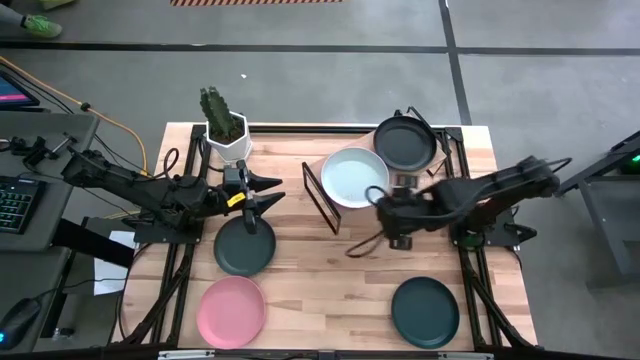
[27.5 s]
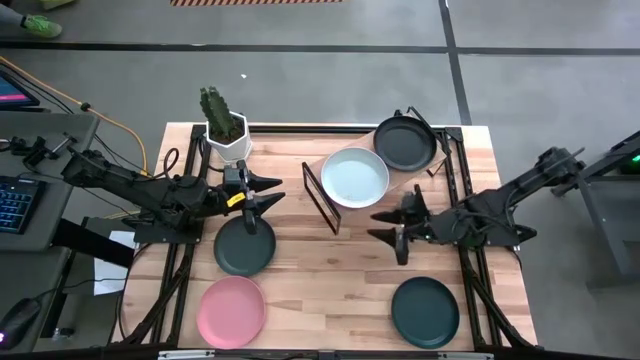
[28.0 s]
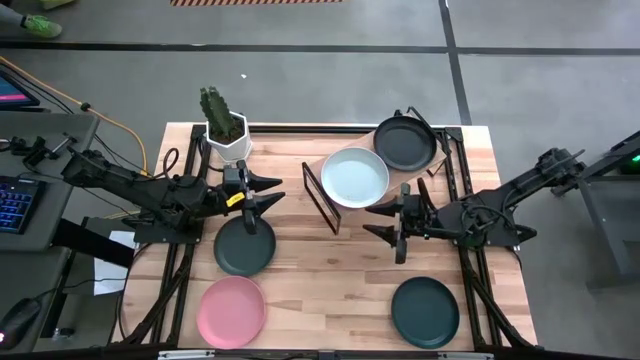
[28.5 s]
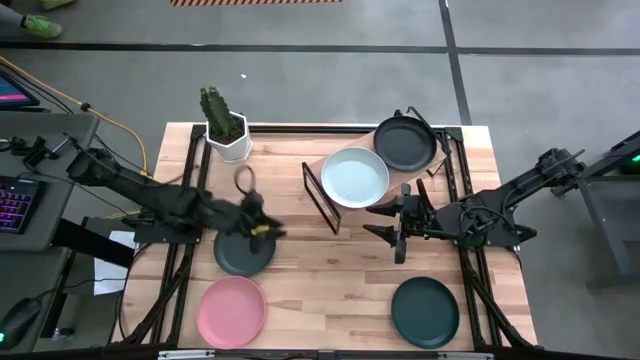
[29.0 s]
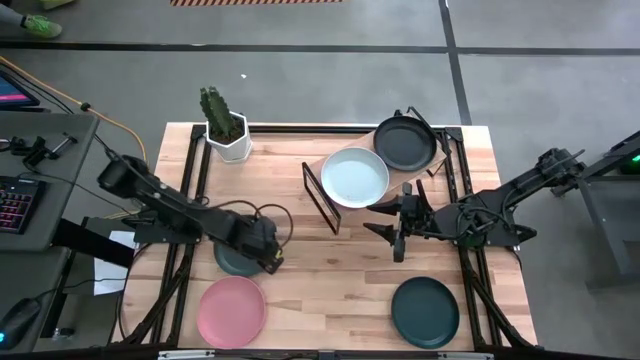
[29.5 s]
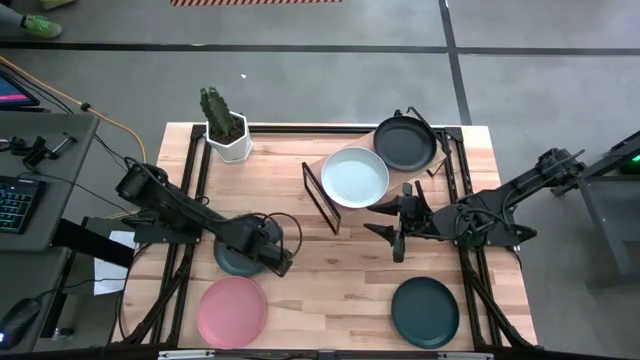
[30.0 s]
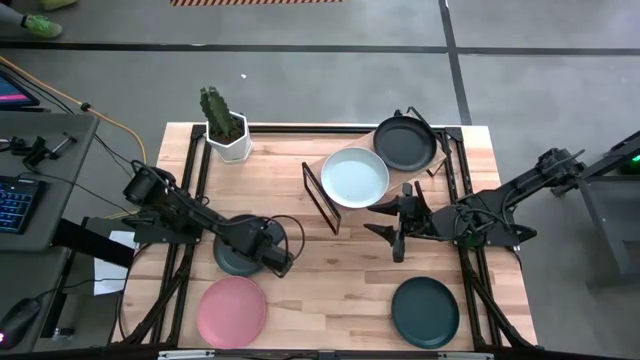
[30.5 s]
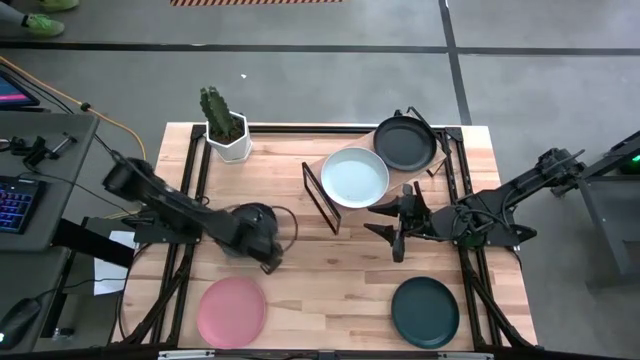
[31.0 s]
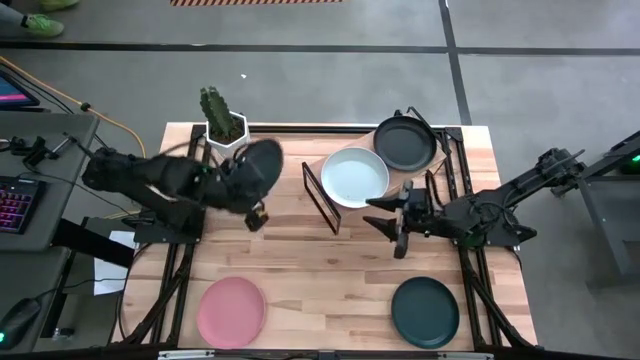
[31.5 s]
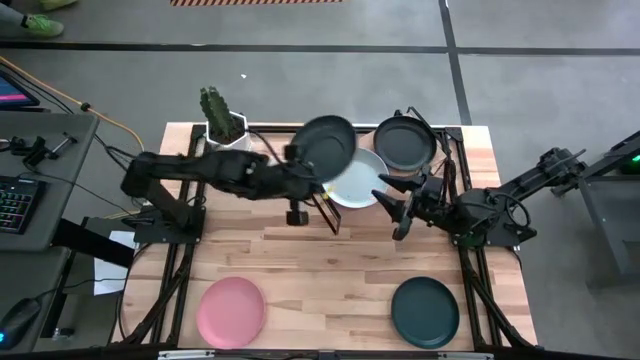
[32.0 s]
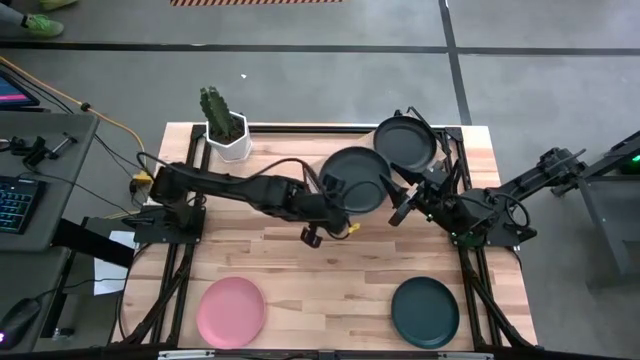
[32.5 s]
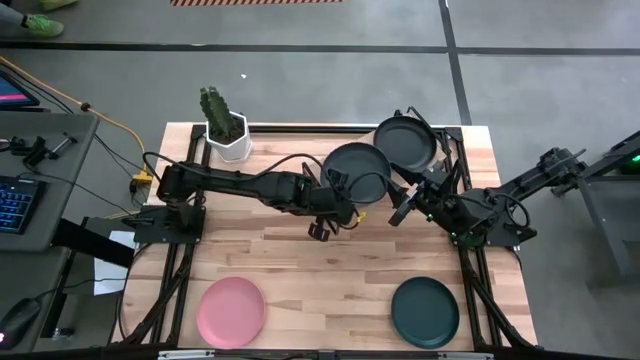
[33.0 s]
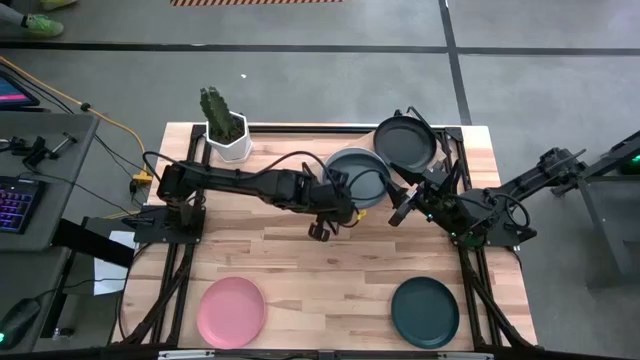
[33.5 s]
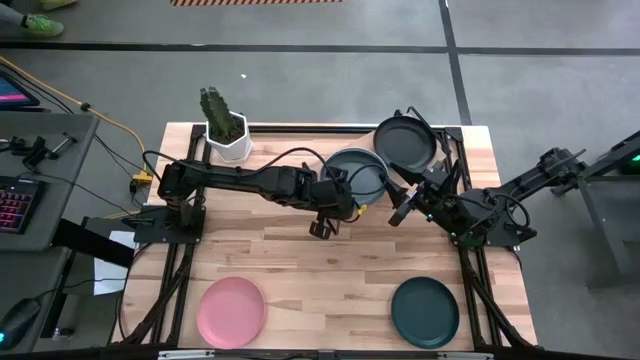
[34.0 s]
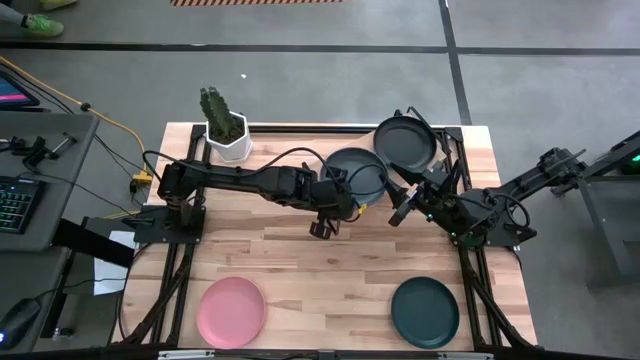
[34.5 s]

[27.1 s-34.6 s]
Task: Place and stack plates onto a shelf
Stack the left black plate on top of the gray plate on the shelf

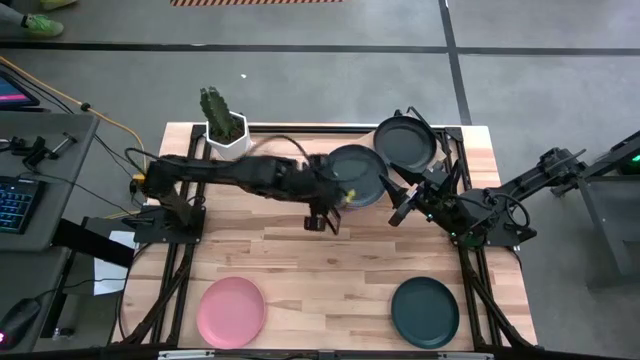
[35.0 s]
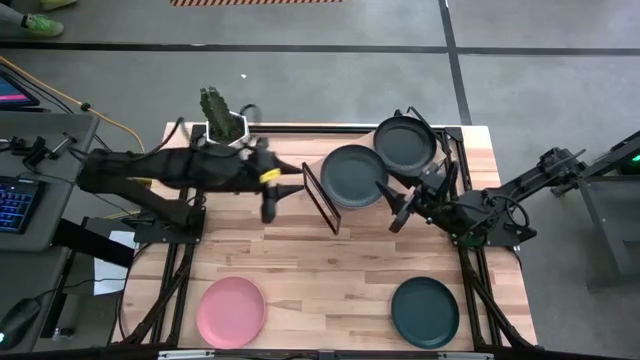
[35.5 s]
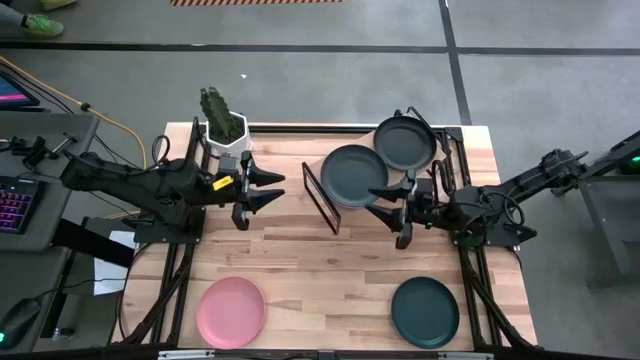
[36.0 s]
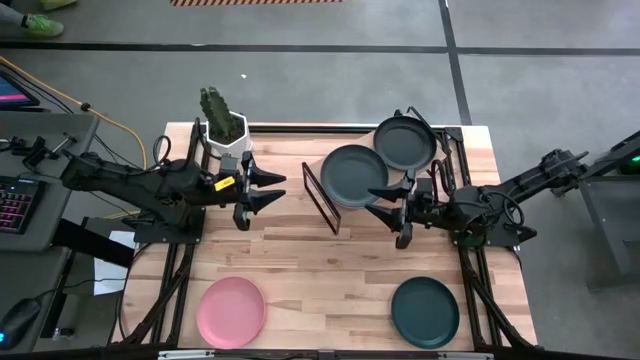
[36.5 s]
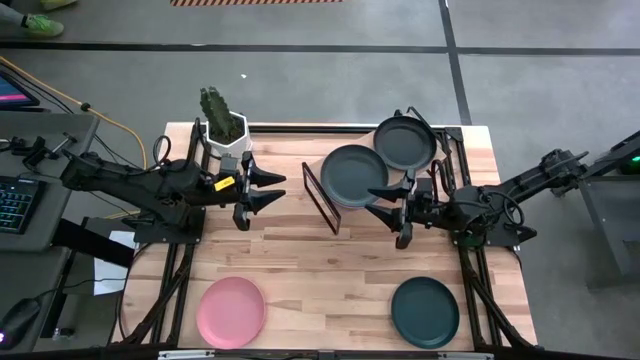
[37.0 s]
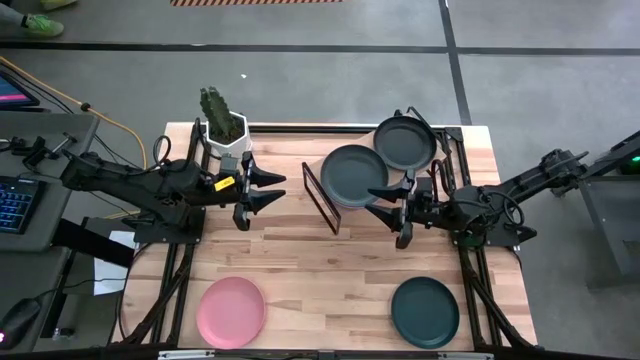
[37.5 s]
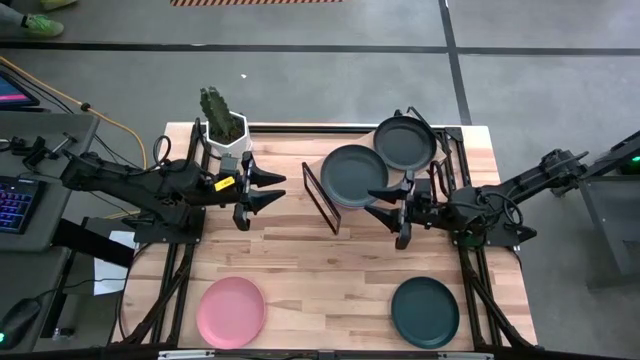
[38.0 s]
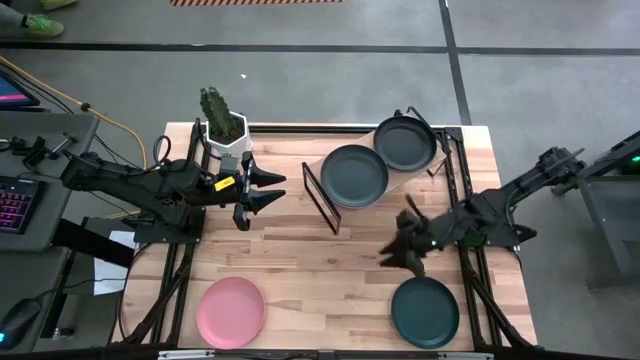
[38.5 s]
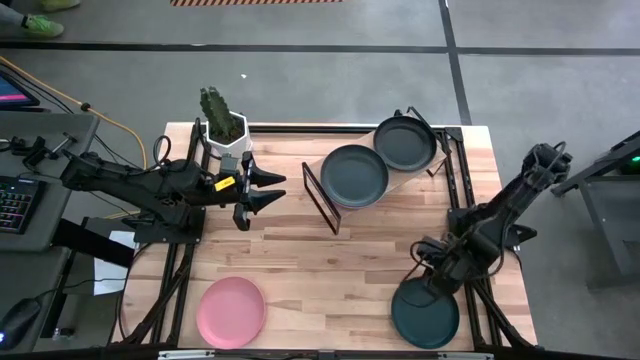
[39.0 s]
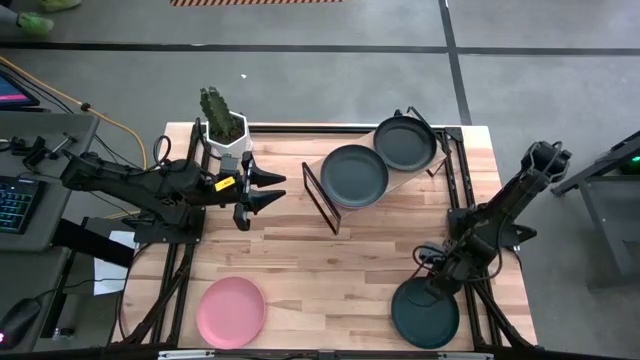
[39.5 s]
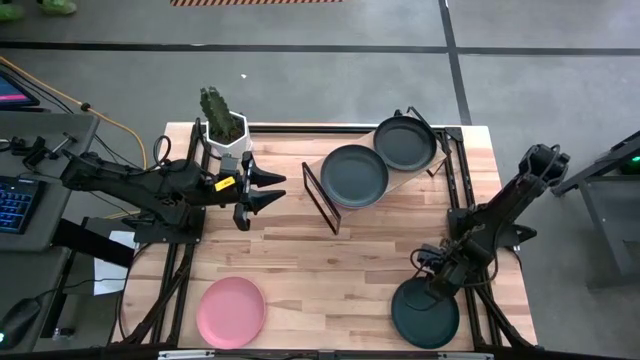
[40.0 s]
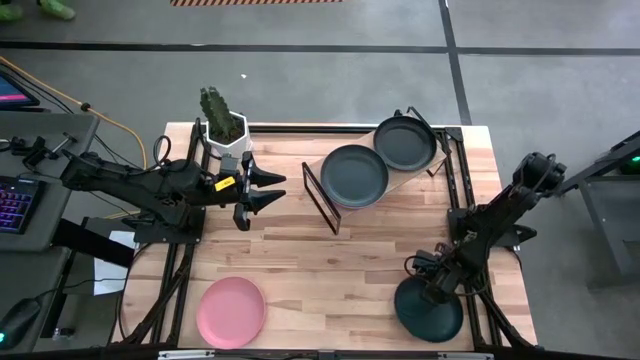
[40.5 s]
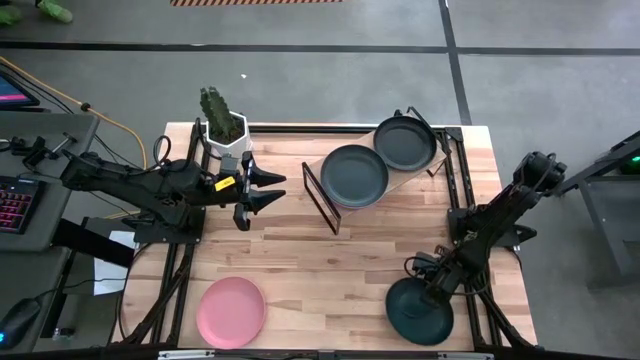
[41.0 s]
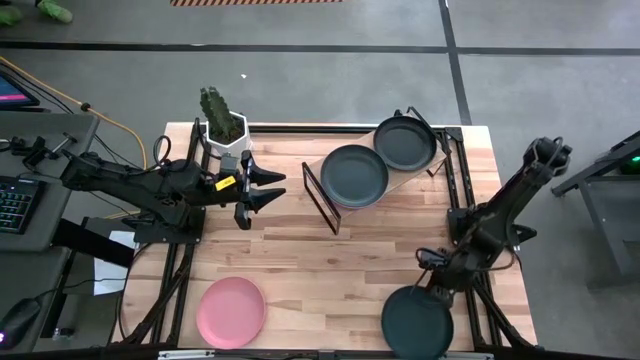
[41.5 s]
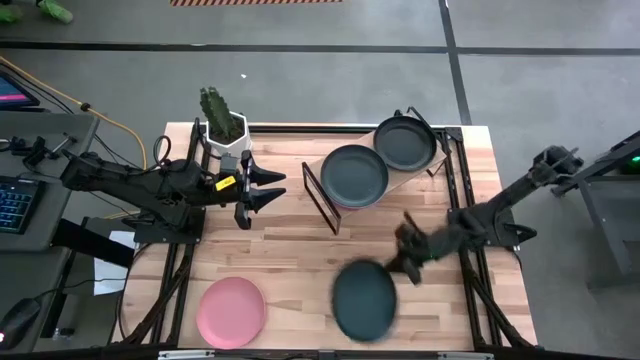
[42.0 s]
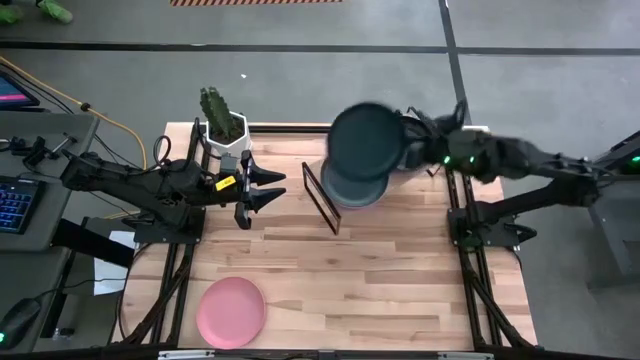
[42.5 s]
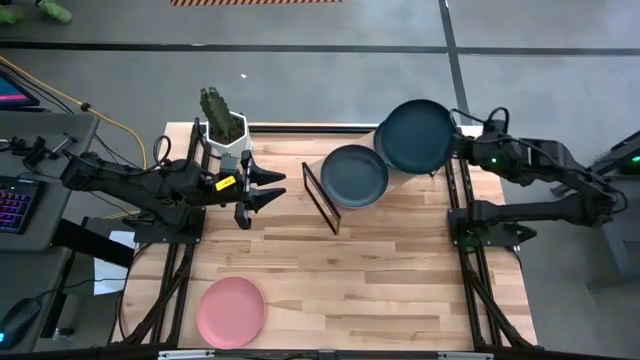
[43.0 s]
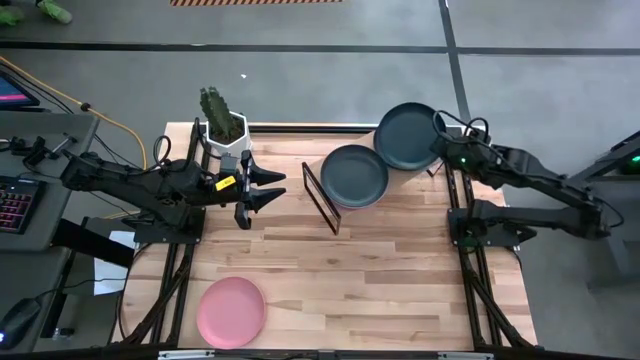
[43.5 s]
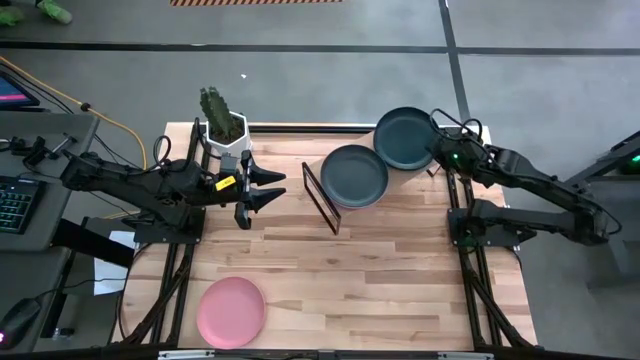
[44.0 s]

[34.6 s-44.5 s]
Stack the black plate on top of the right black plate on the shelf

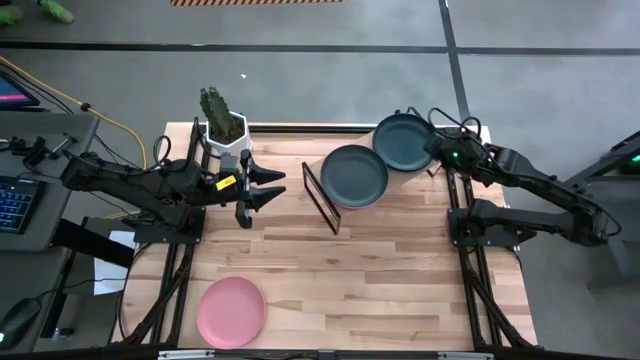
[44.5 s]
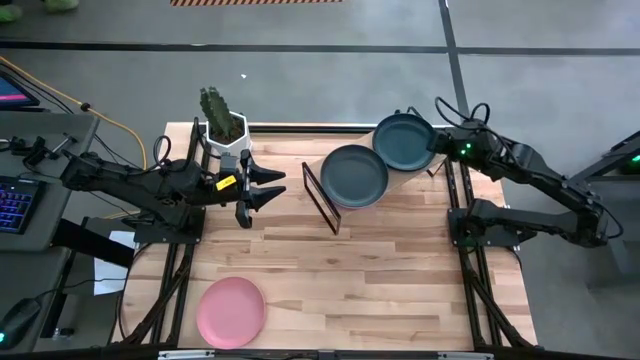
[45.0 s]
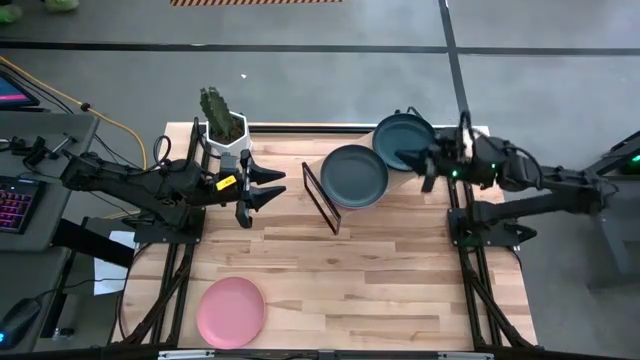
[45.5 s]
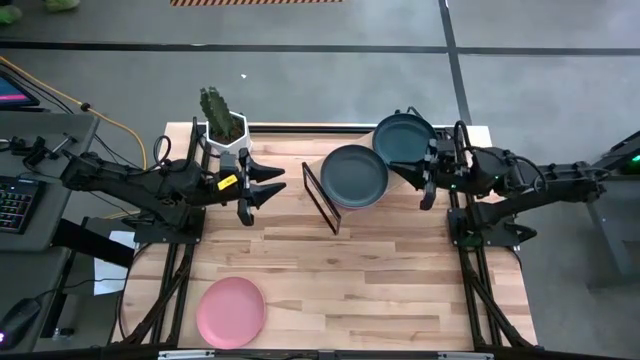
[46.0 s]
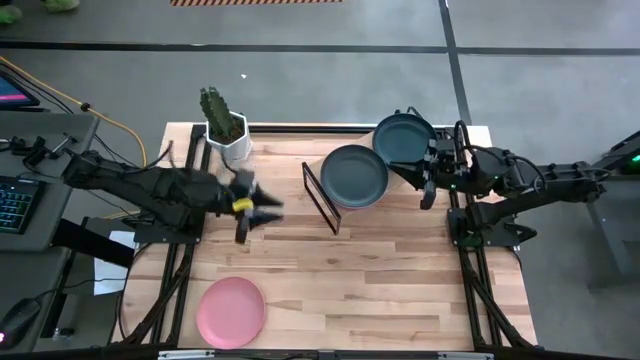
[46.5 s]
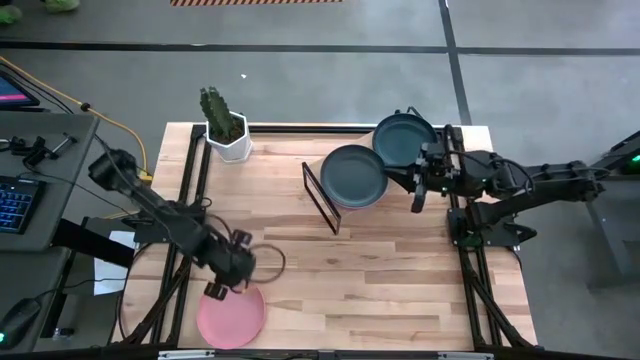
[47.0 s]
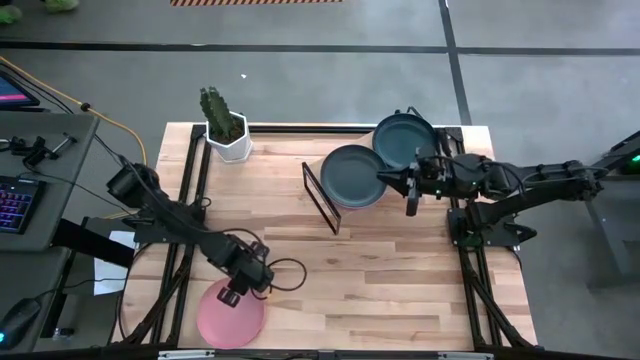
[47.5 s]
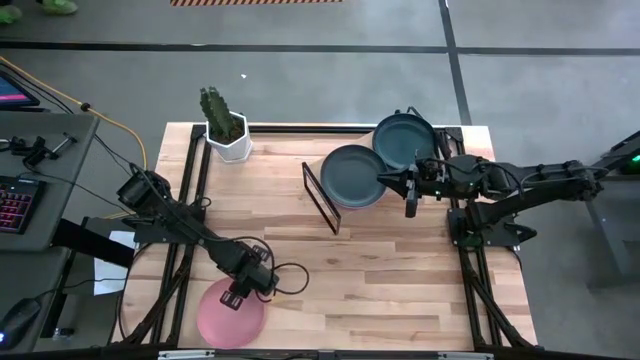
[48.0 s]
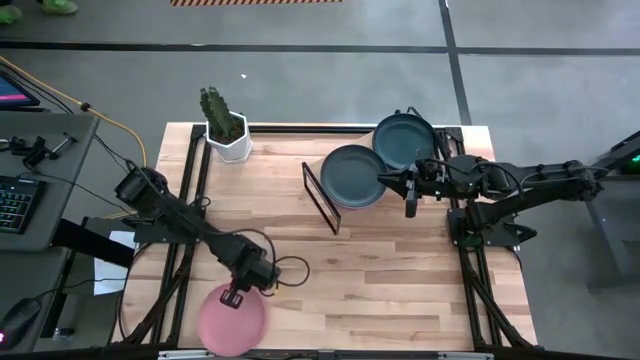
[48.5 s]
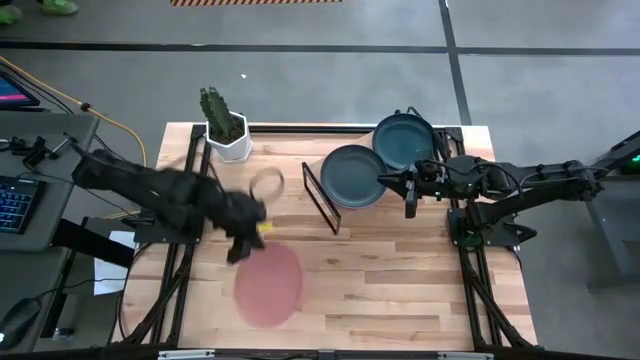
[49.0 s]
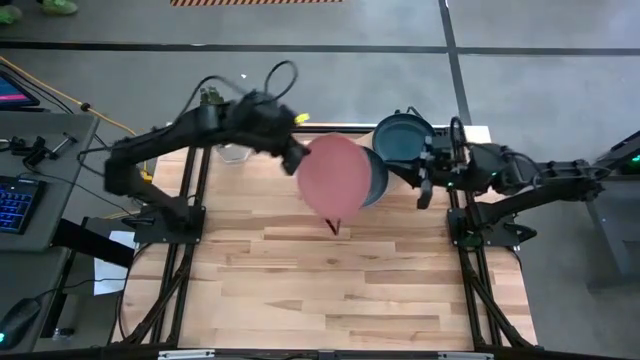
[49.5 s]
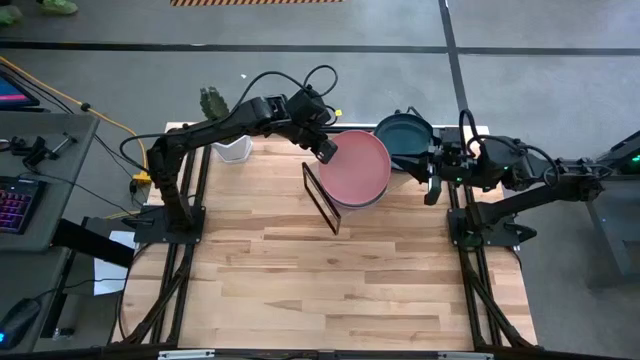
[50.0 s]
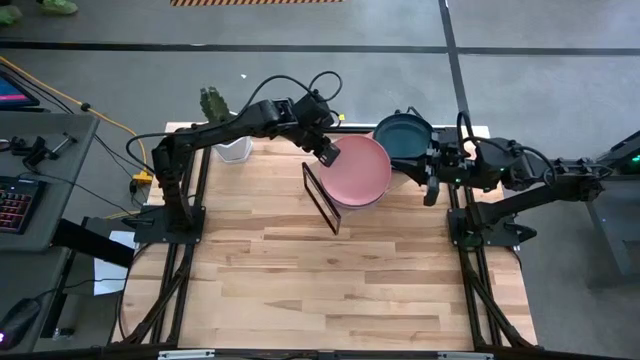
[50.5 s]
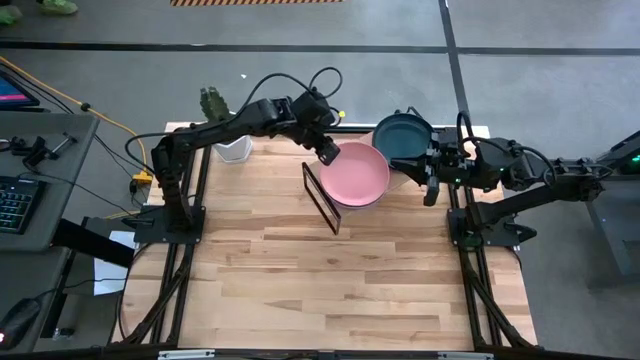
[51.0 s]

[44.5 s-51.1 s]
Stack the pink plate on top of the left black plate on the shelf
